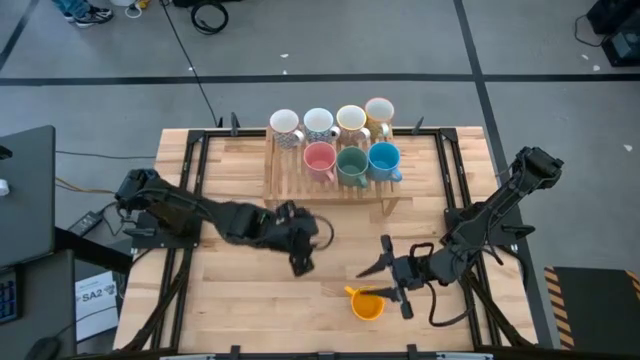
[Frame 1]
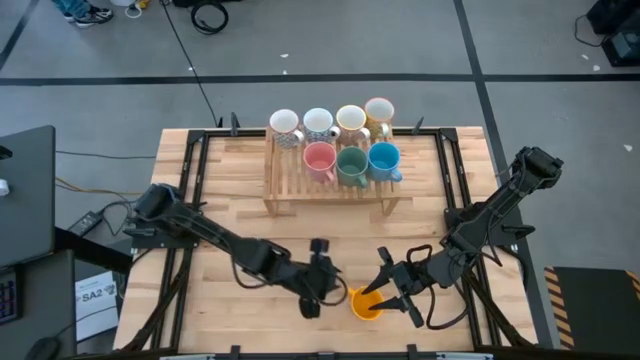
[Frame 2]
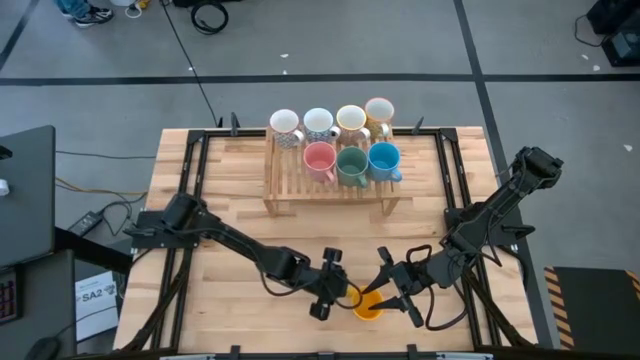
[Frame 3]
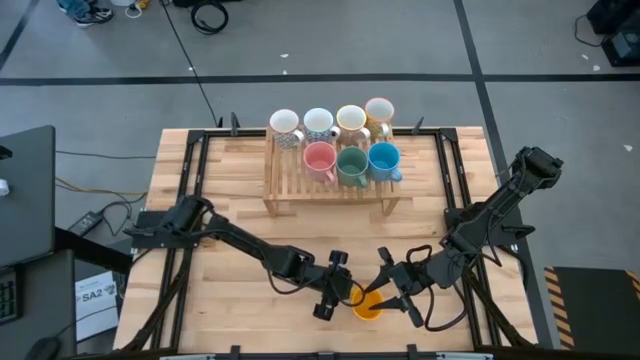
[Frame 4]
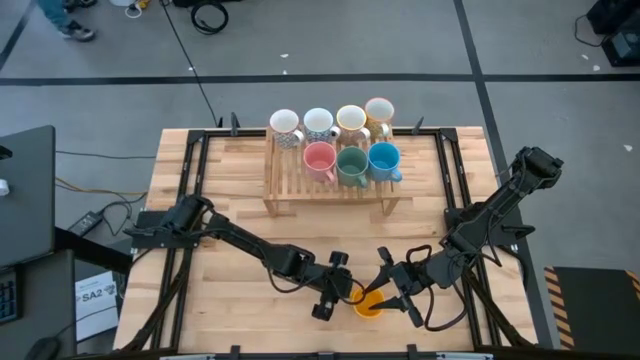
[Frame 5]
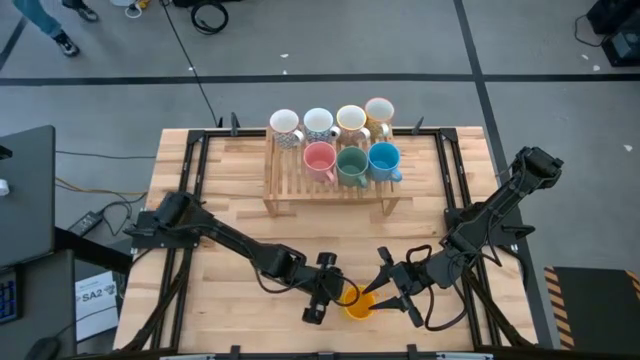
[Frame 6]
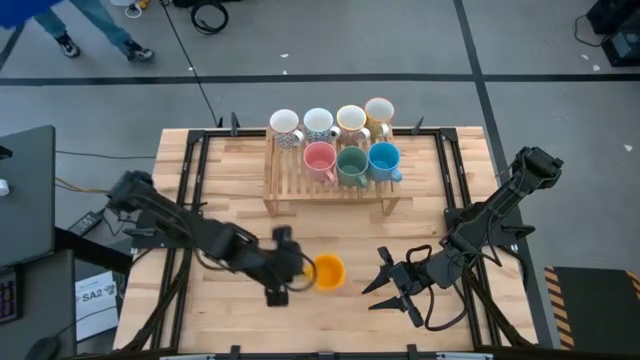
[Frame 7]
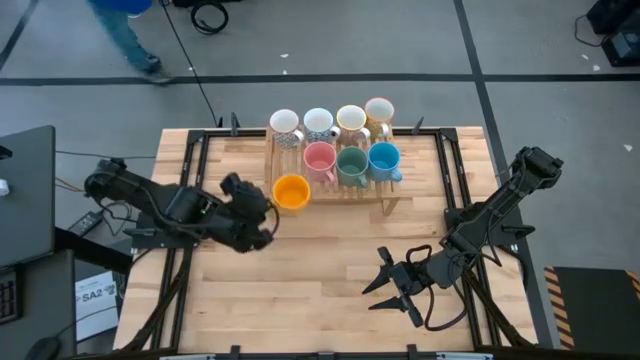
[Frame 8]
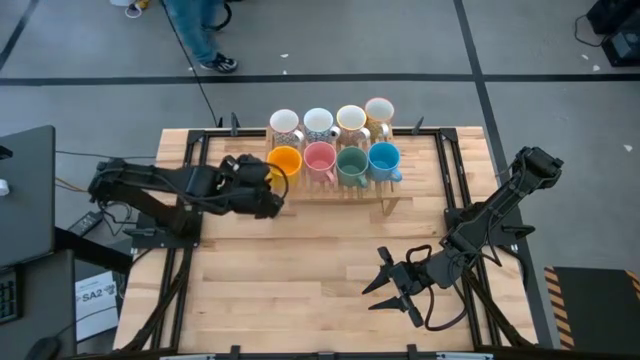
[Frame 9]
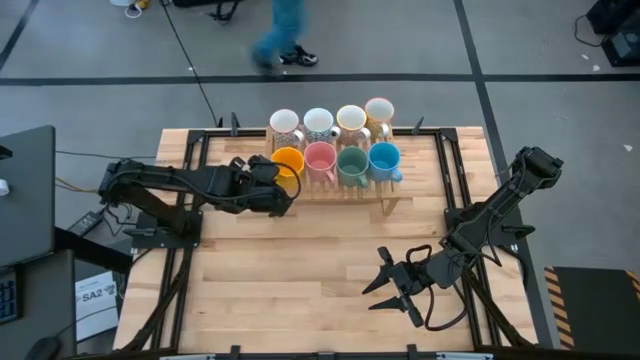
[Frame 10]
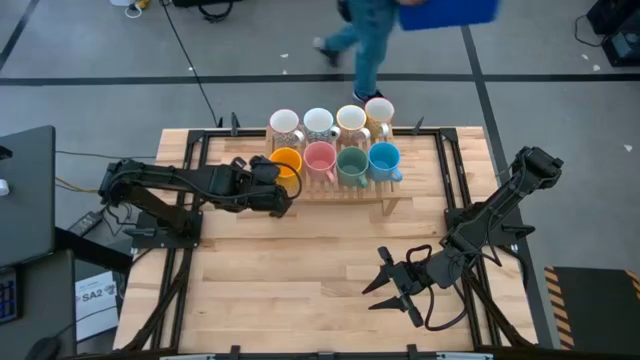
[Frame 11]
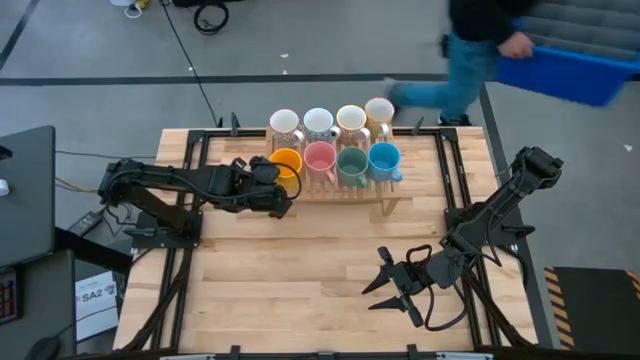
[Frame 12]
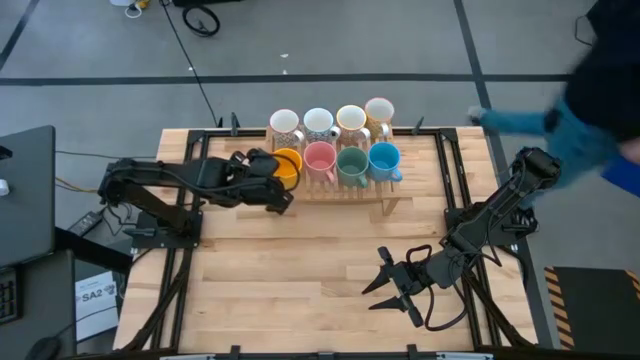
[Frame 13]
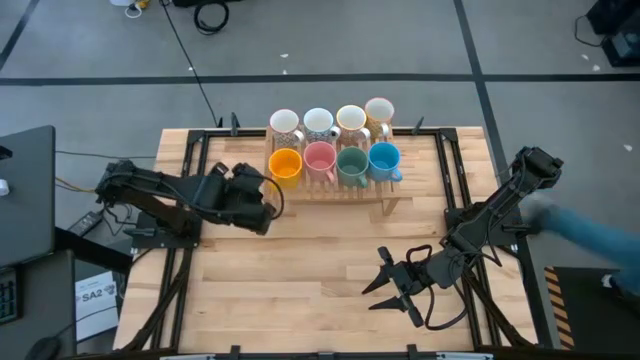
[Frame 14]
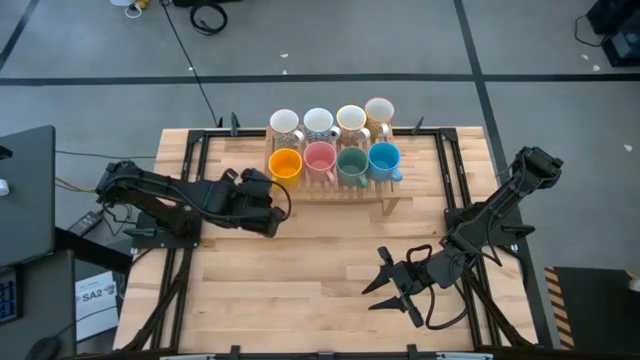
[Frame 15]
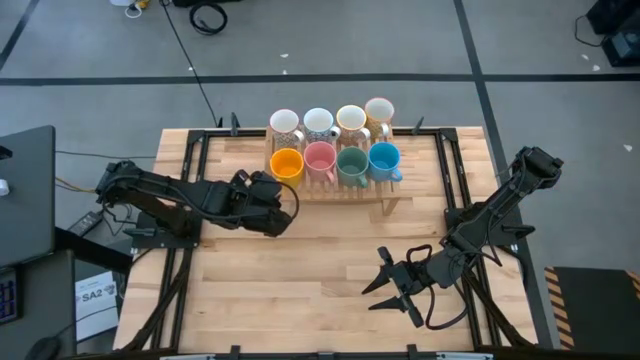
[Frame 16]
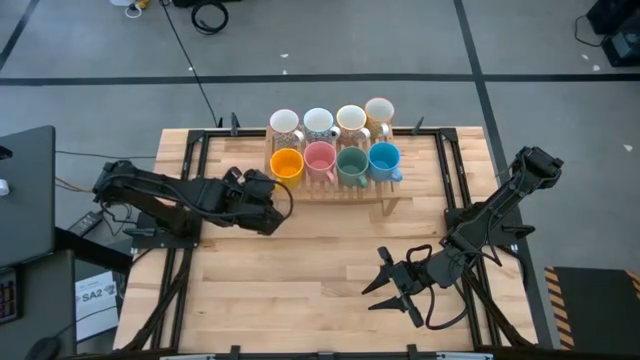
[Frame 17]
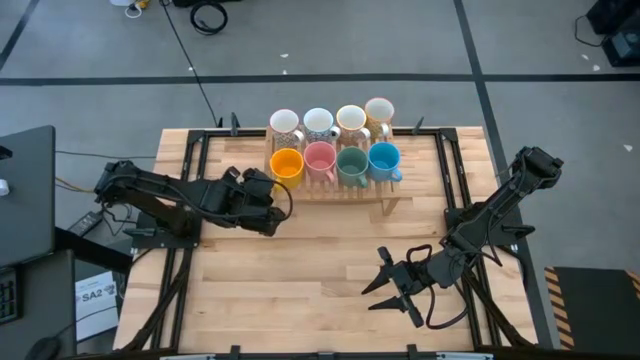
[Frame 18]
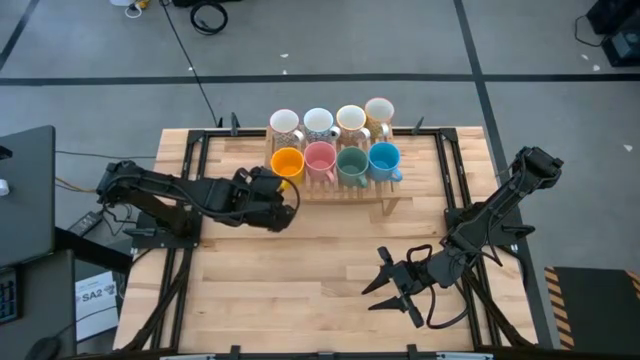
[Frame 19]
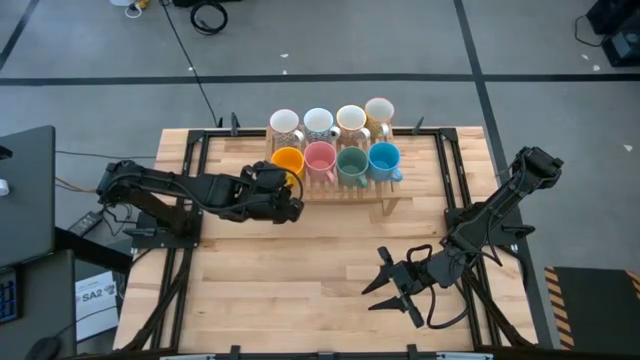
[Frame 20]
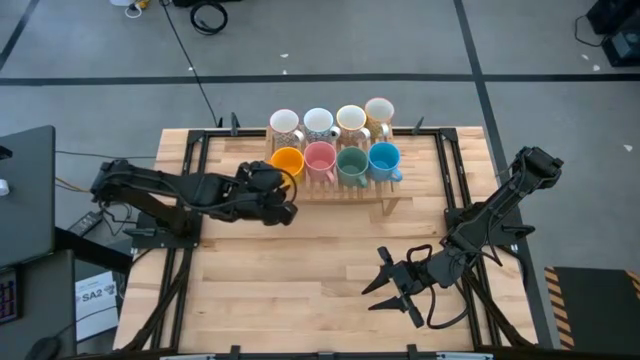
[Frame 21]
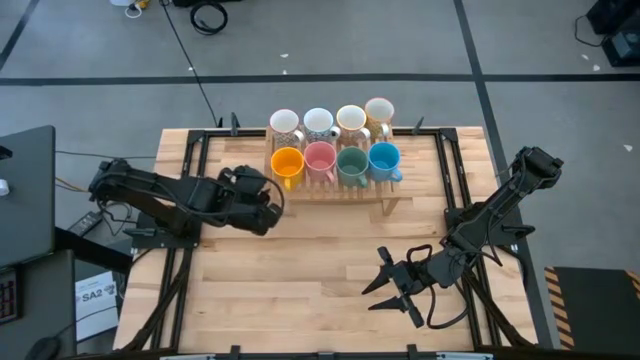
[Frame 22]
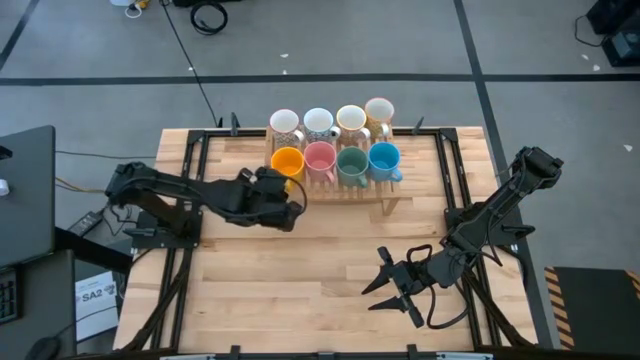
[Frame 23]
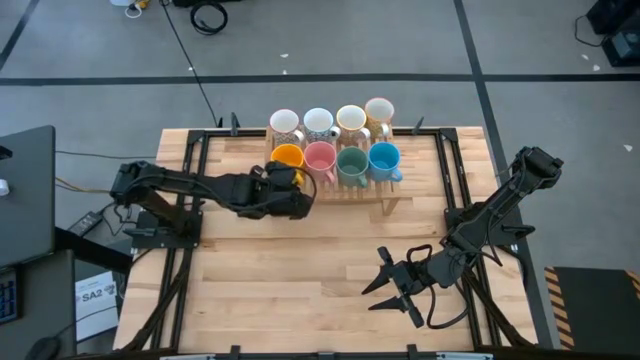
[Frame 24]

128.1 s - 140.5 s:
Task: Place coffee mugs
Put the yellow mug on the shelf aligned with the gray mug

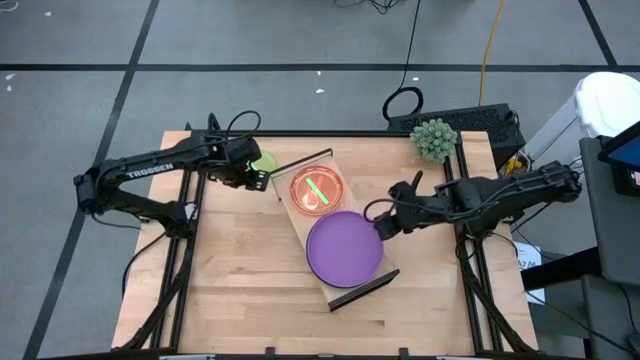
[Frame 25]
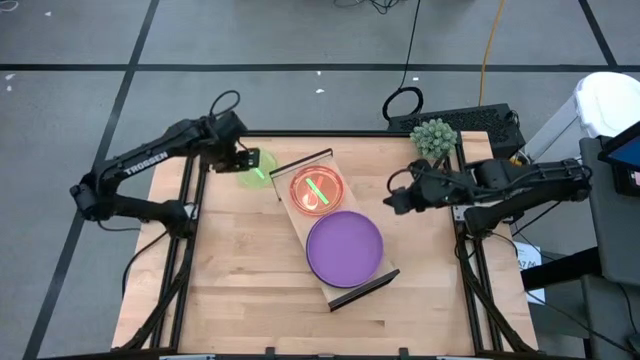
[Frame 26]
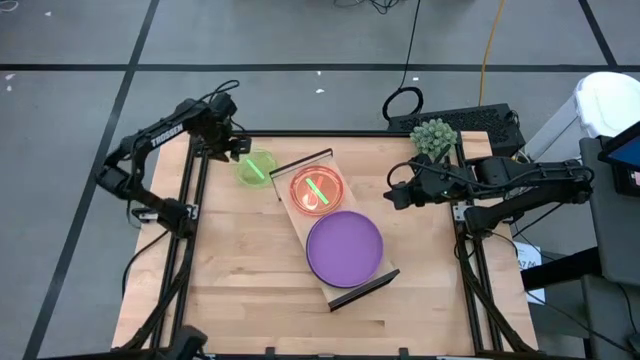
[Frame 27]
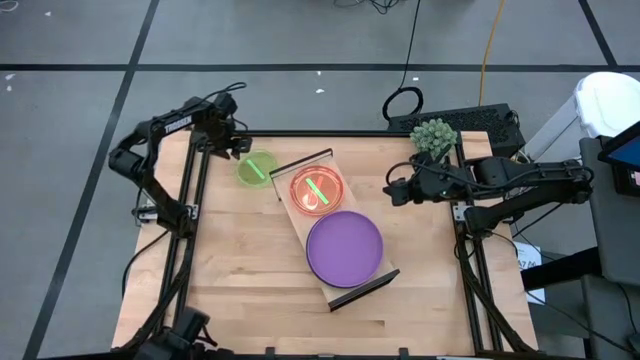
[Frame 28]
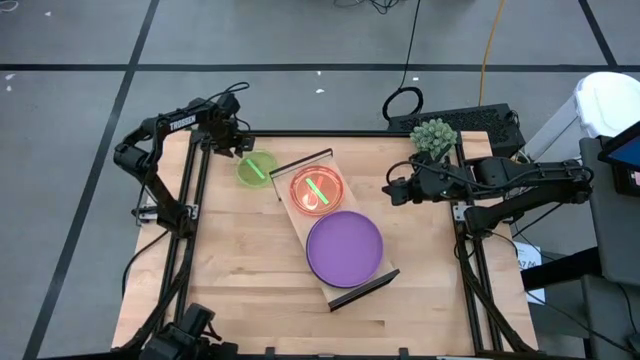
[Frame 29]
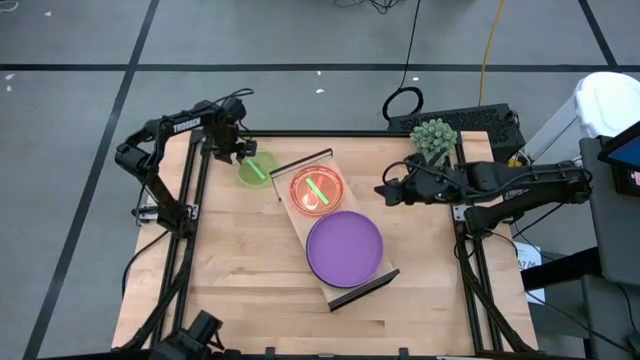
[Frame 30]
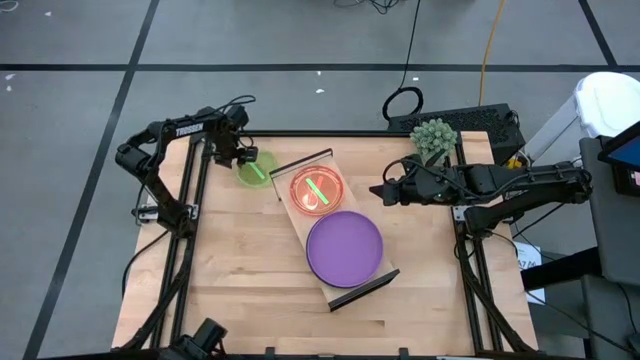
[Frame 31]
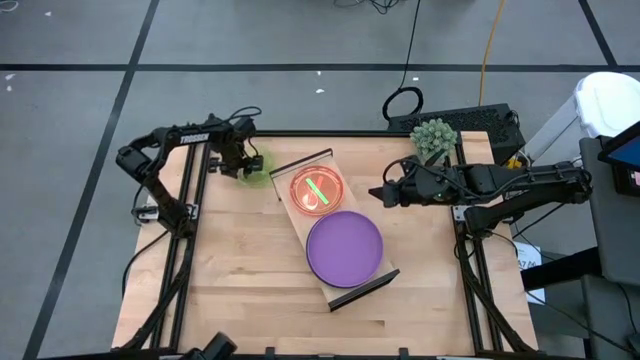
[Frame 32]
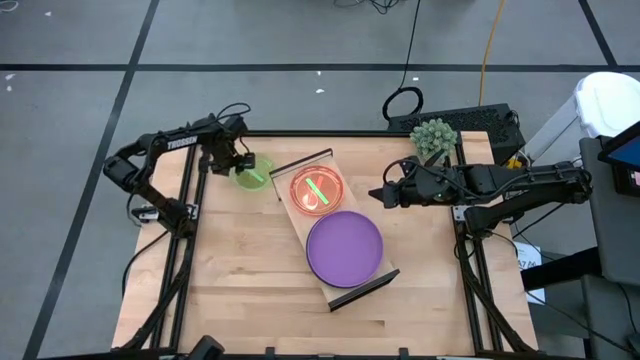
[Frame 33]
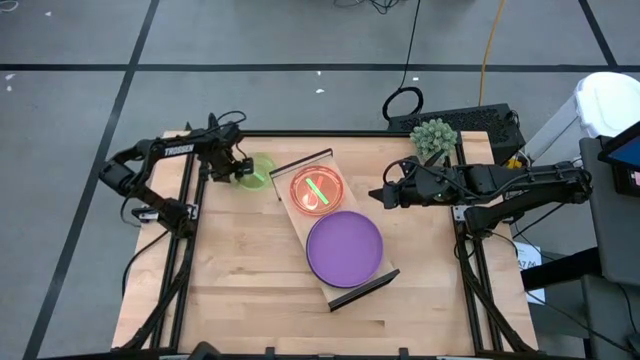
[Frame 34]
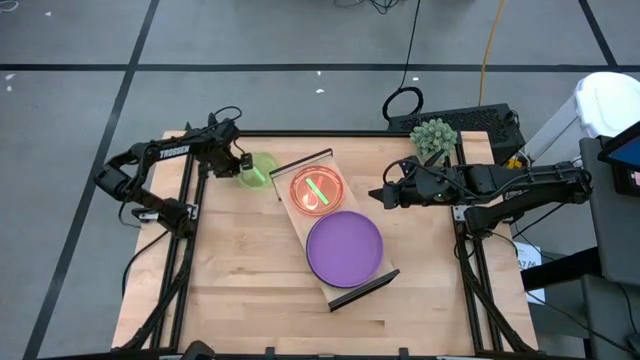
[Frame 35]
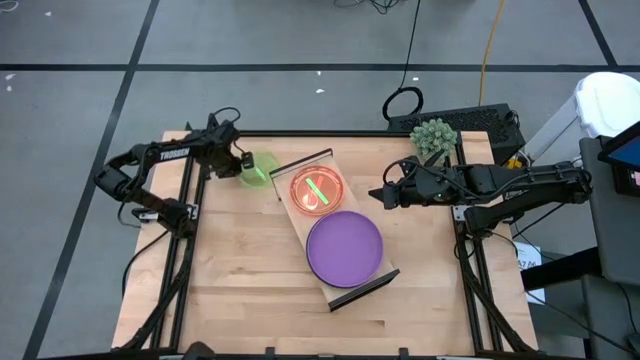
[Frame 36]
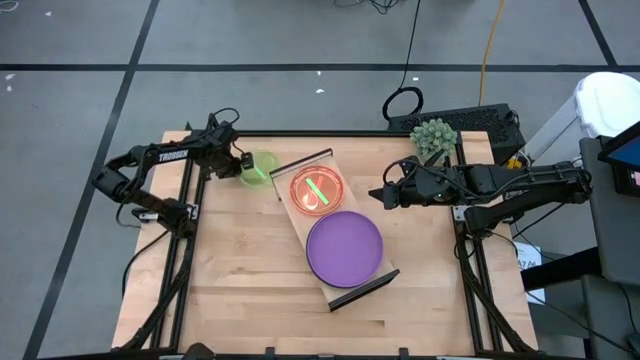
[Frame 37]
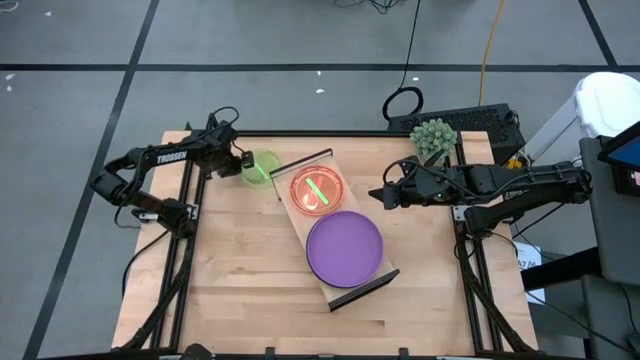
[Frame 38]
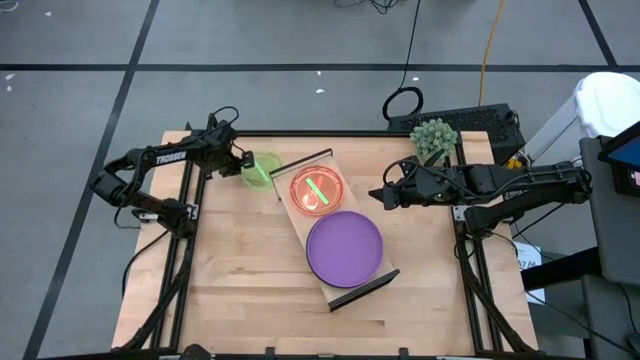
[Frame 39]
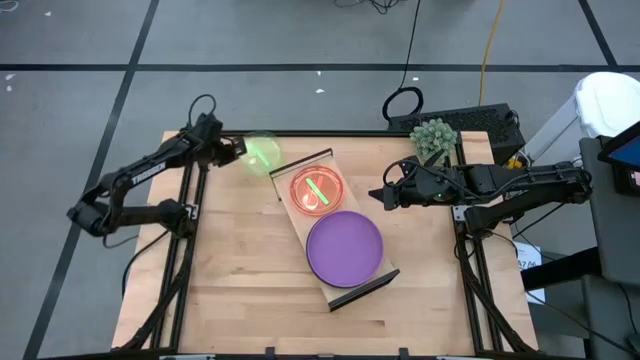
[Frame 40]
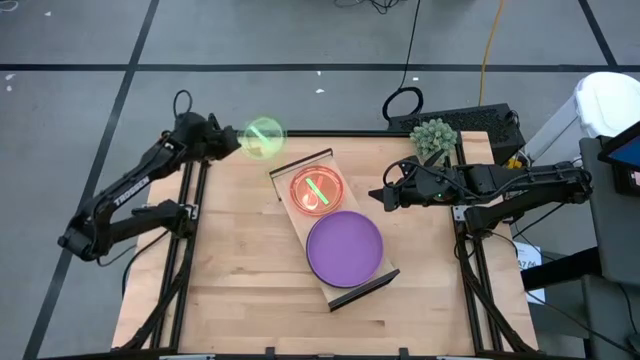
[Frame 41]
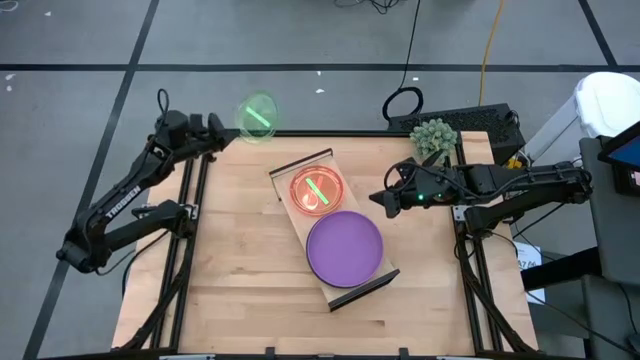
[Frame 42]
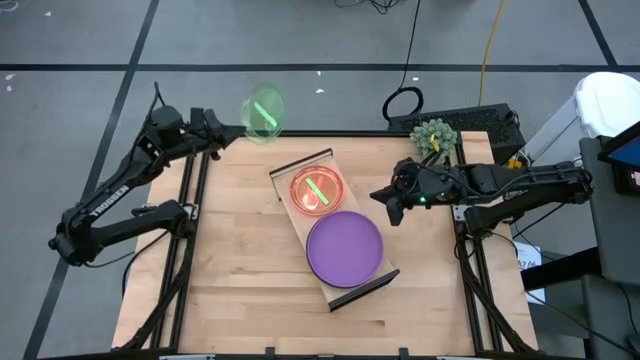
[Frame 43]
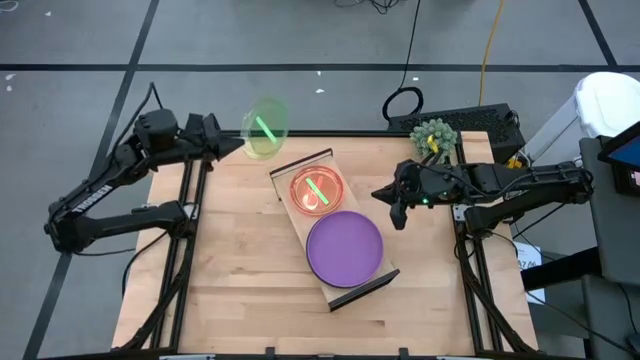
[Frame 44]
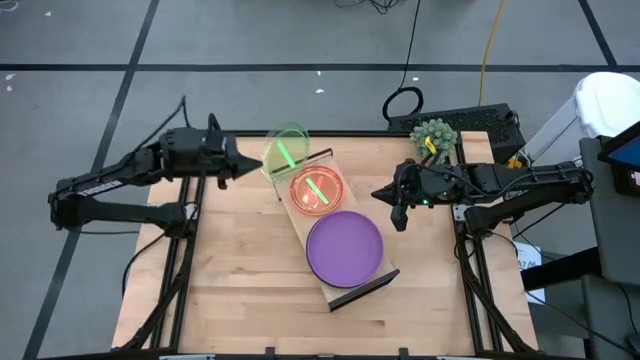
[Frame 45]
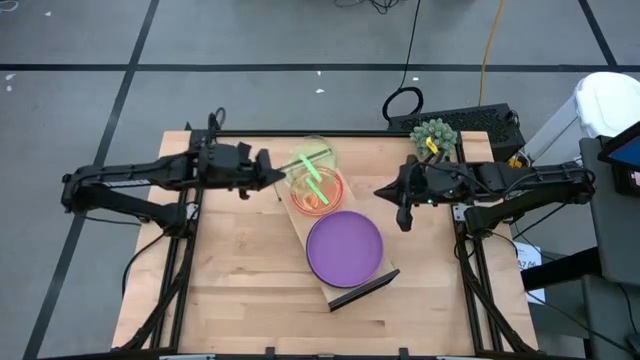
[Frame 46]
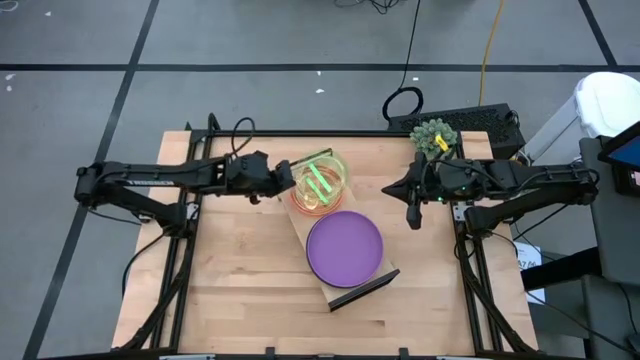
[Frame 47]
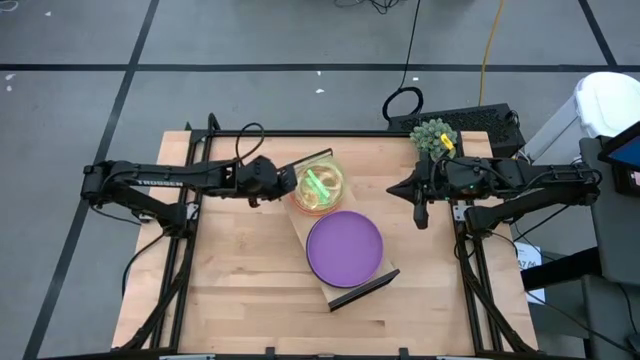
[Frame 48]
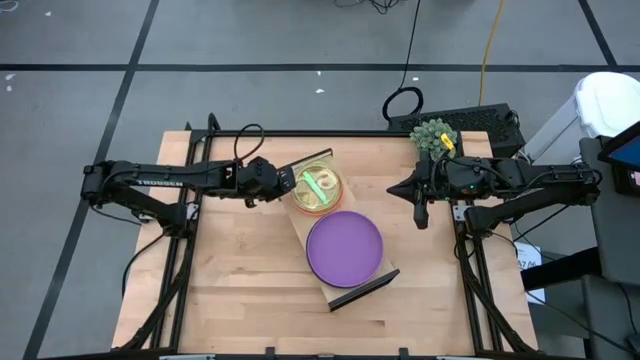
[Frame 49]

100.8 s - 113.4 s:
Task: Place and stack plates onto a shelf
Stack the green plate on top of the green plate on the shelf
